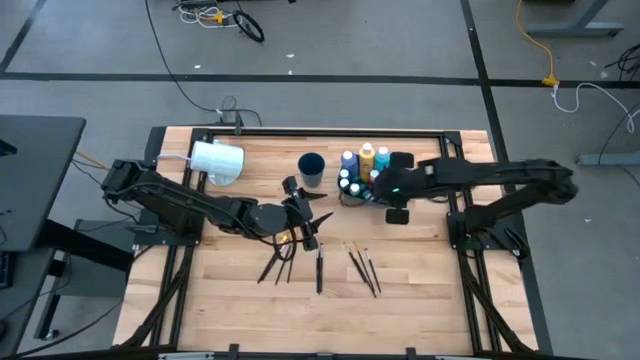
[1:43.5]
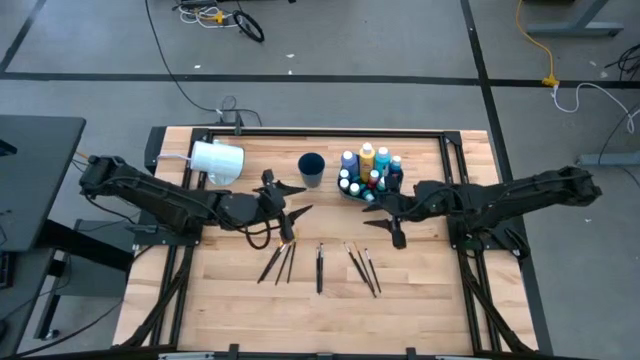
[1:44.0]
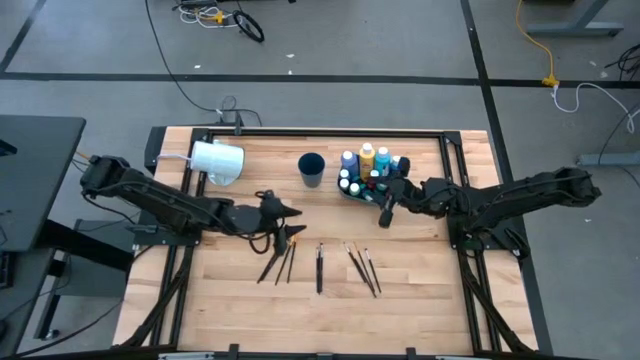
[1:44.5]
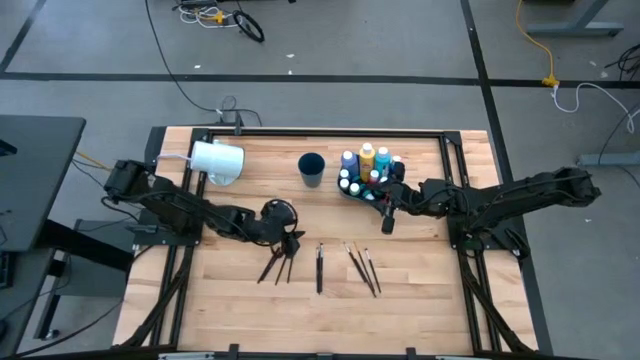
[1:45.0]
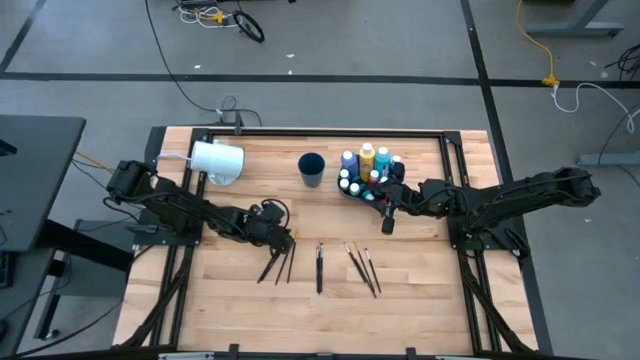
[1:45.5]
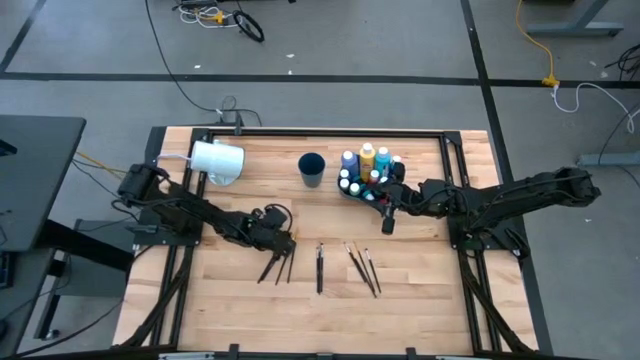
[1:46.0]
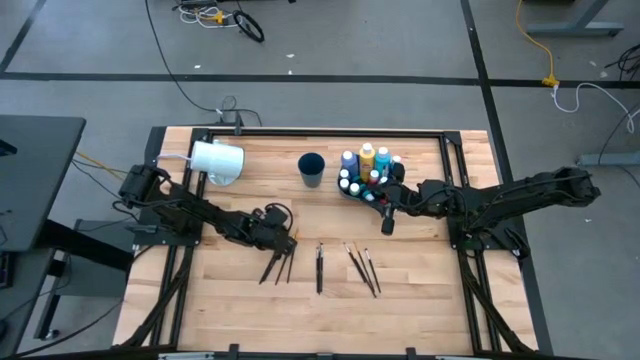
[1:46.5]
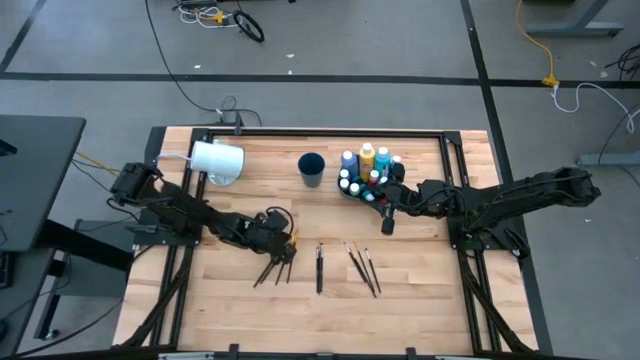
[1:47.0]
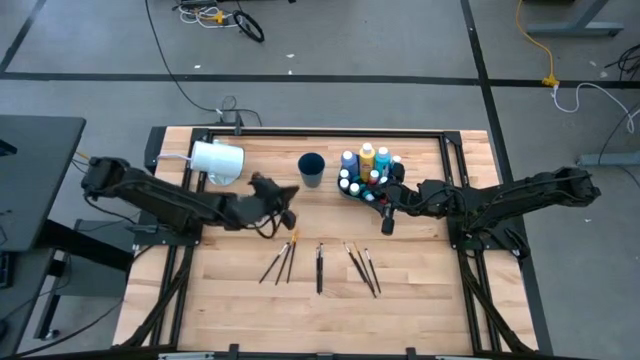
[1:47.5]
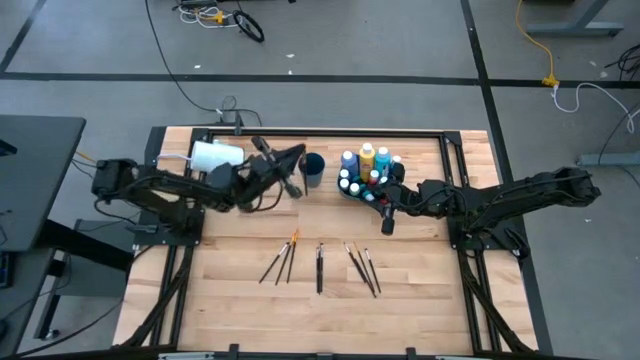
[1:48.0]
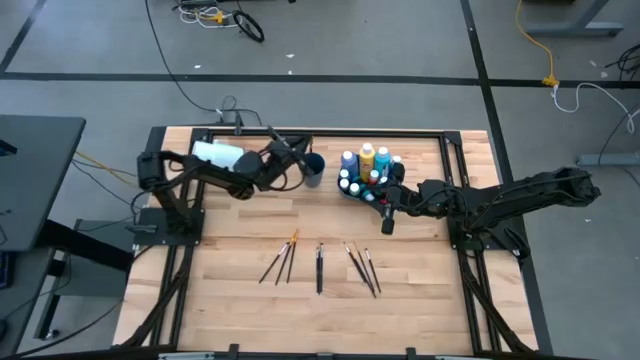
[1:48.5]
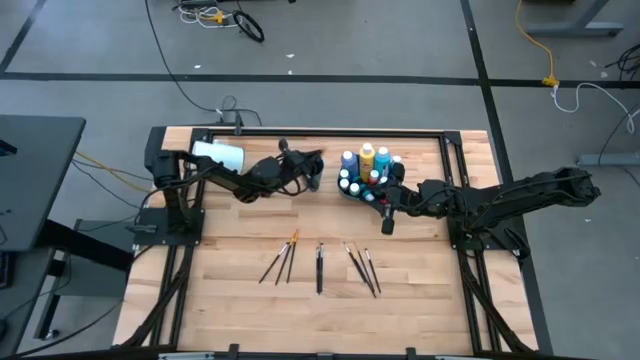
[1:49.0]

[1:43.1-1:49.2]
Task: Pick & Place Paint Supplies
Put the gold paint brush into the blue cup

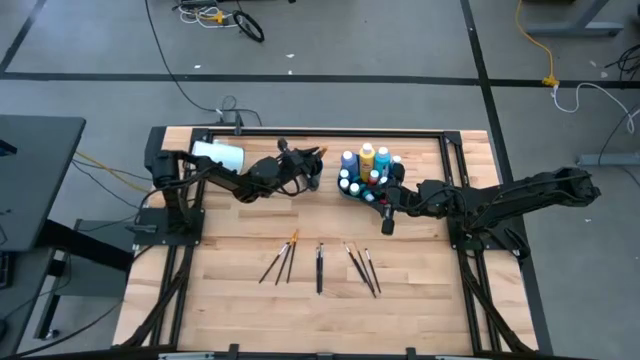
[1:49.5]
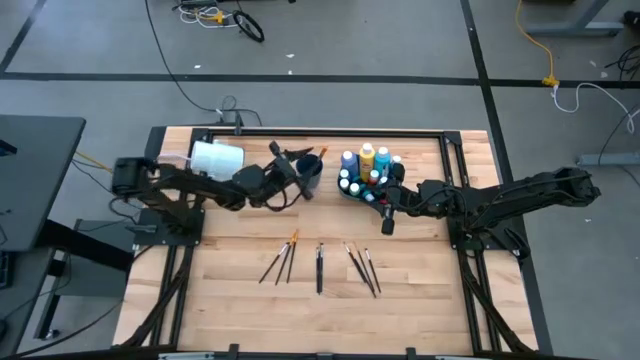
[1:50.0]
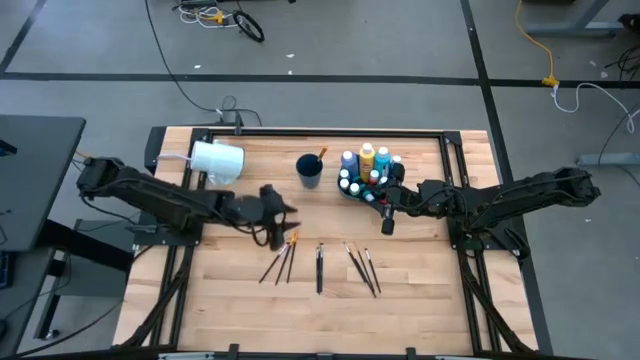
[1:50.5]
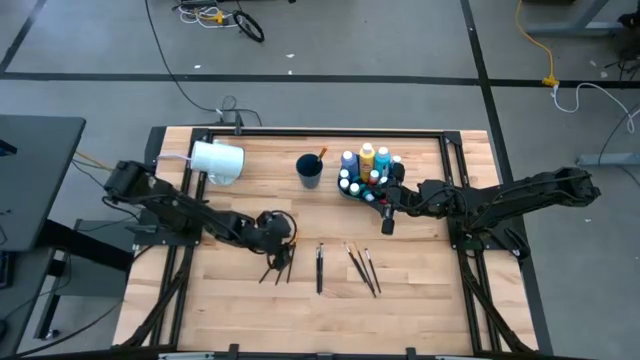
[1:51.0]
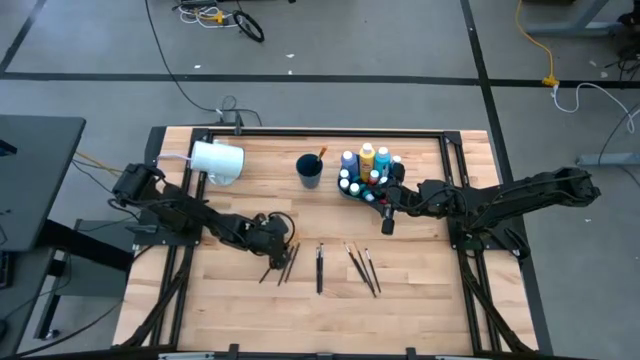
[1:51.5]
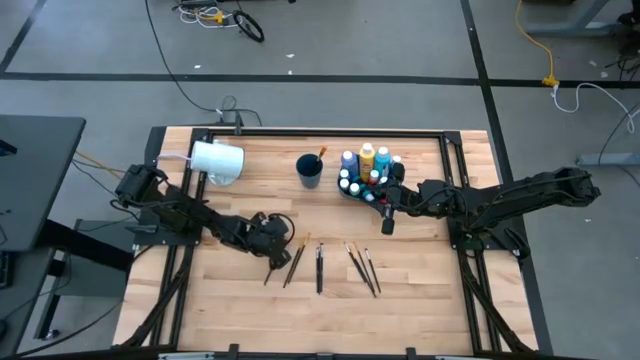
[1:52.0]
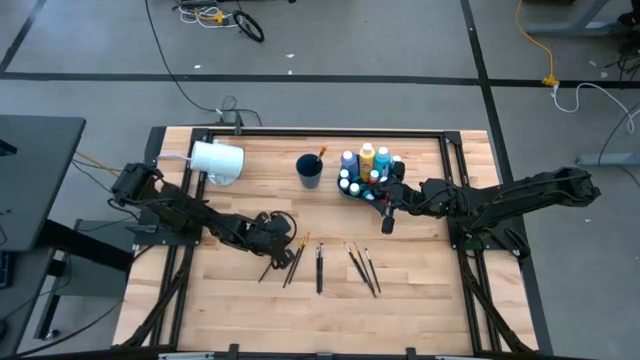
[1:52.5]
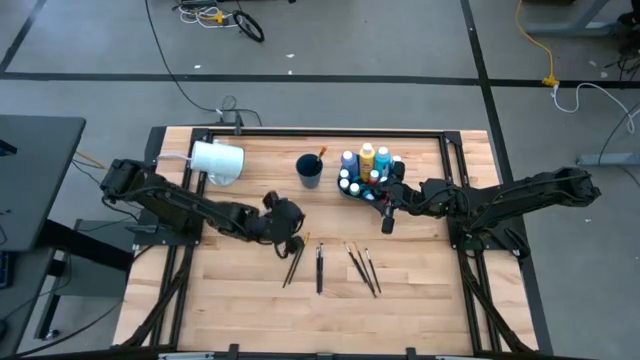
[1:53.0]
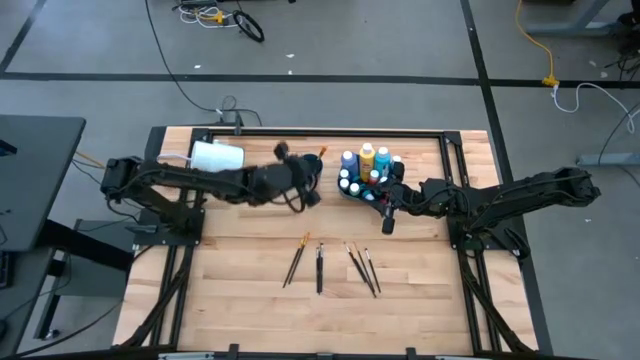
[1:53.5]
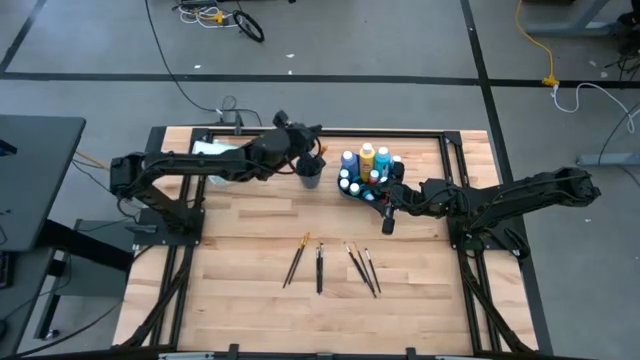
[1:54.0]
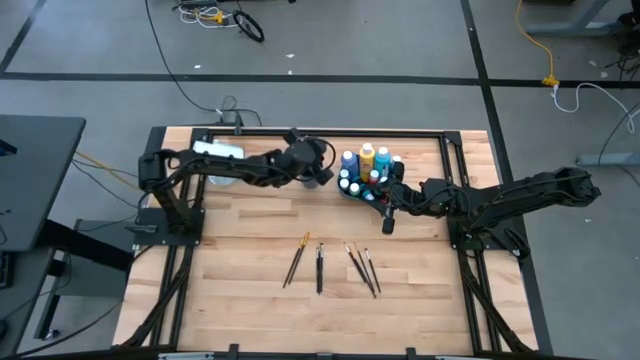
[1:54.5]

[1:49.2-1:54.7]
Put the silver paint brush into the blue cup

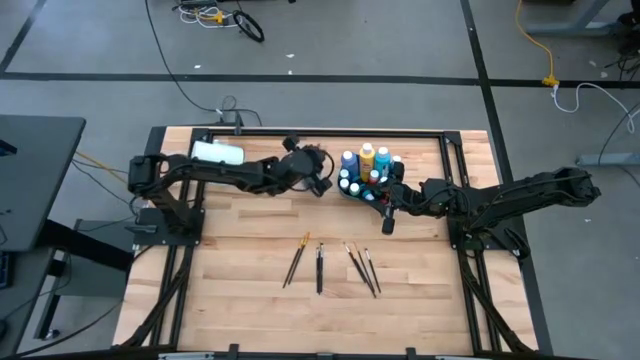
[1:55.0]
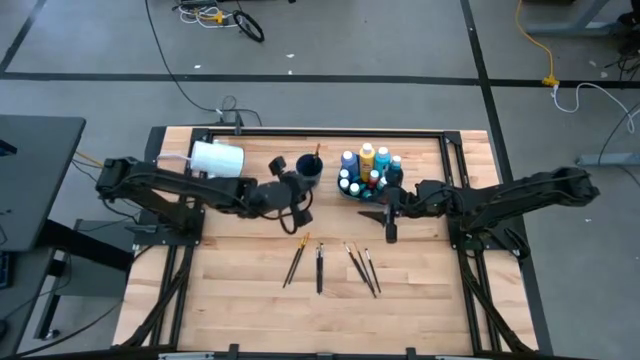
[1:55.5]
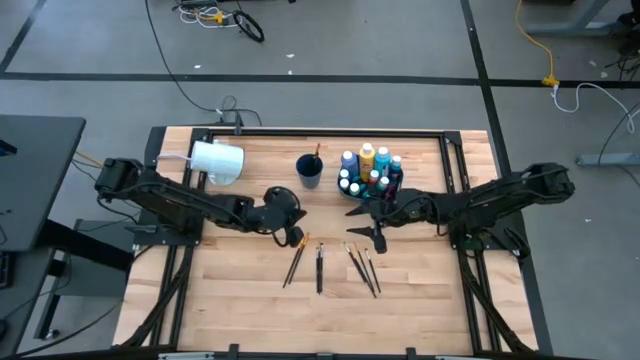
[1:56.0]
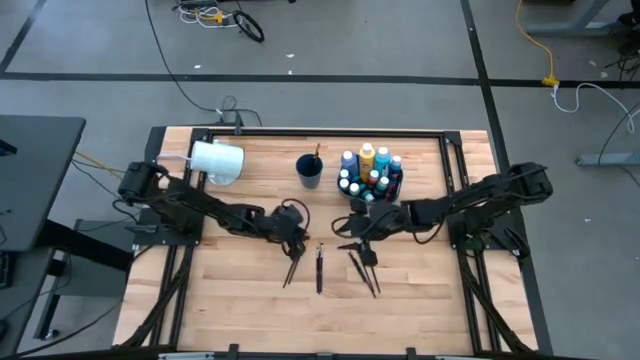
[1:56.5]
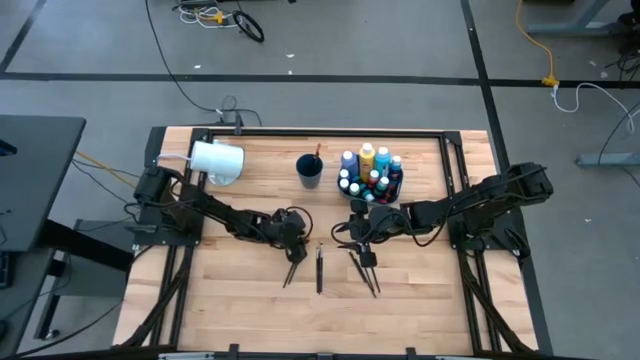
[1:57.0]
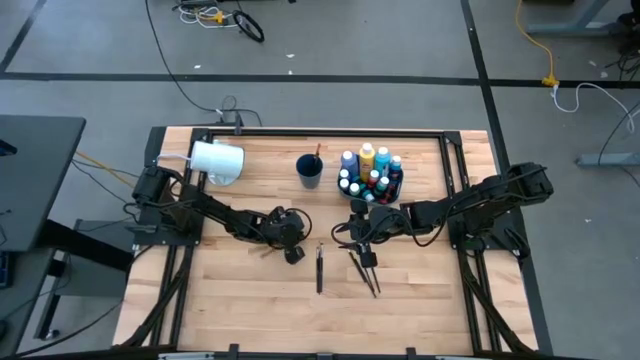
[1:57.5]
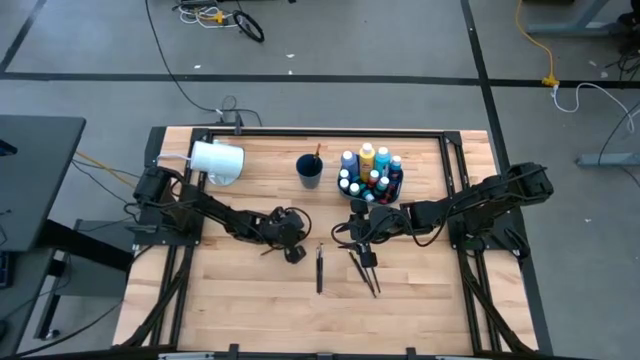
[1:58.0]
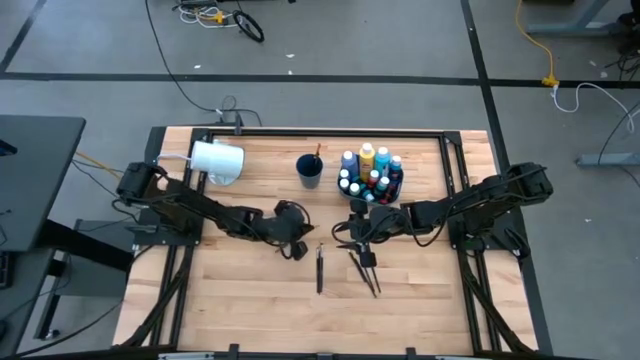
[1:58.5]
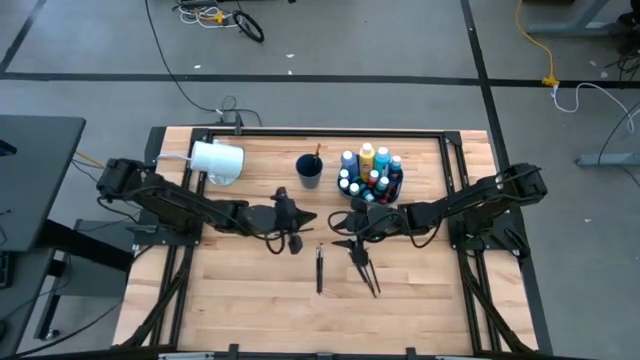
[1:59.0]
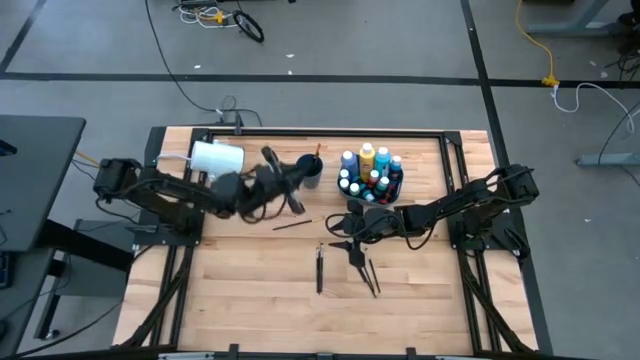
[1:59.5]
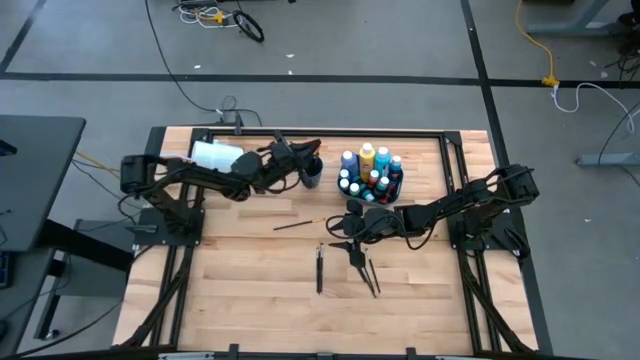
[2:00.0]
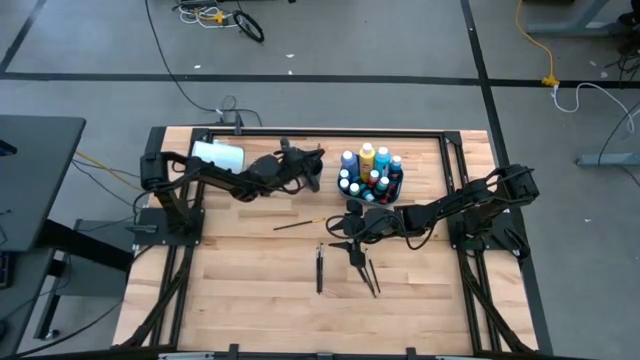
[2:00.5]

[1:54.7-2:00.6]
Put the gold paint brush into the blue cup

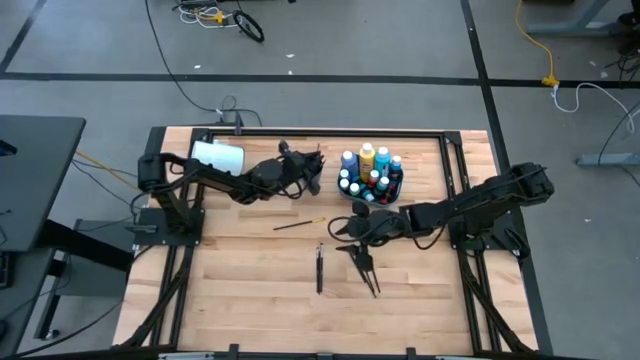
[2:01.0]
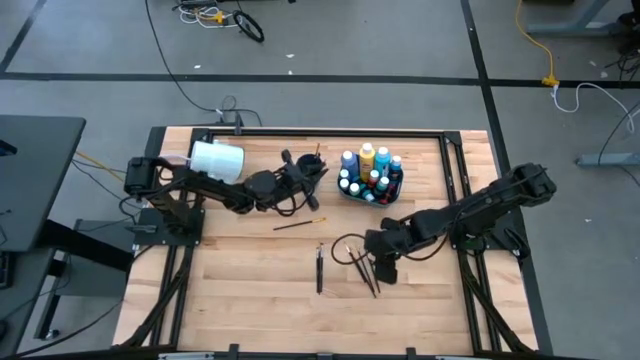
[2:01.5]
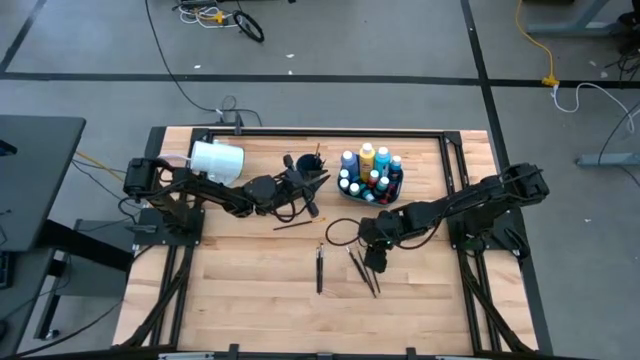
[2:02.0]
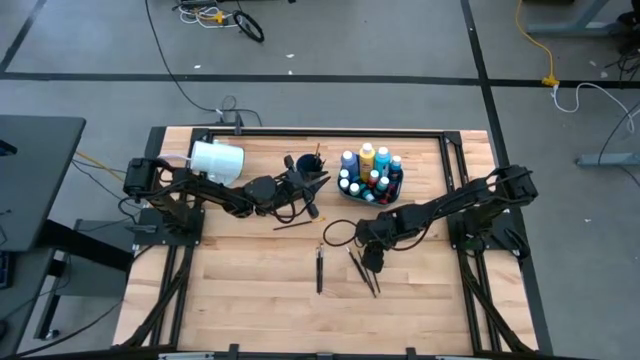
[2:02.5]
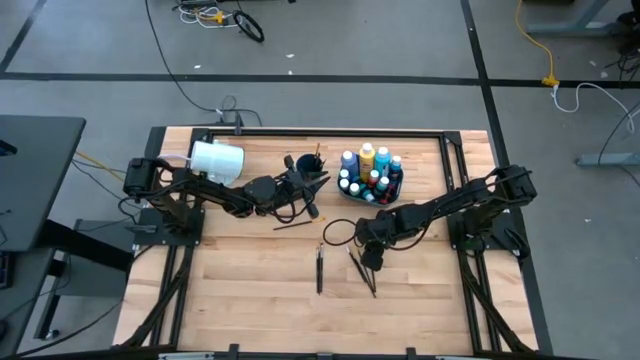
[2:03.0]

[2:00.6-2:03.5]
Put the silver paint brush into the blue cup

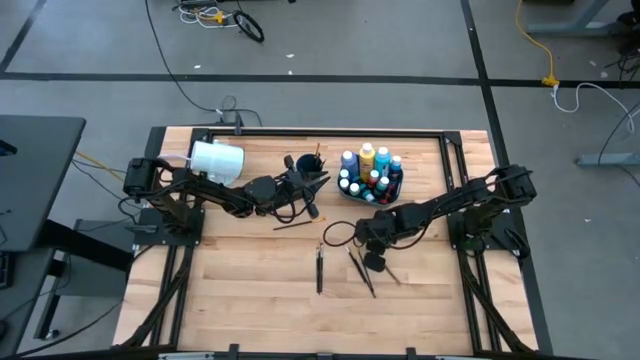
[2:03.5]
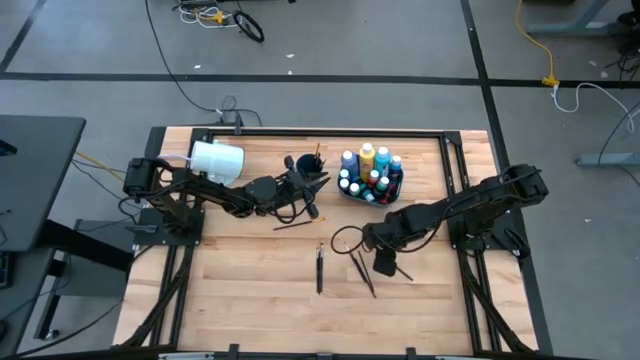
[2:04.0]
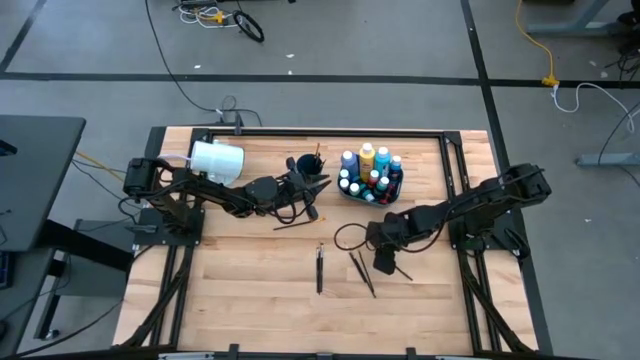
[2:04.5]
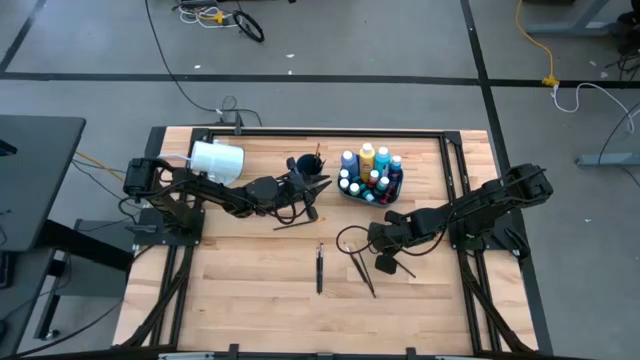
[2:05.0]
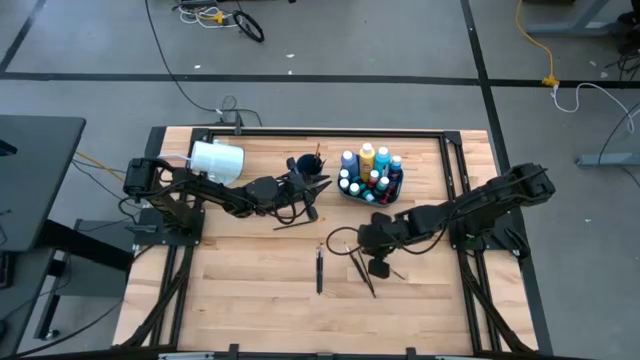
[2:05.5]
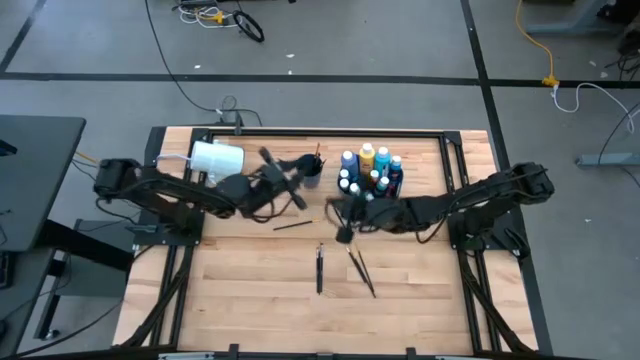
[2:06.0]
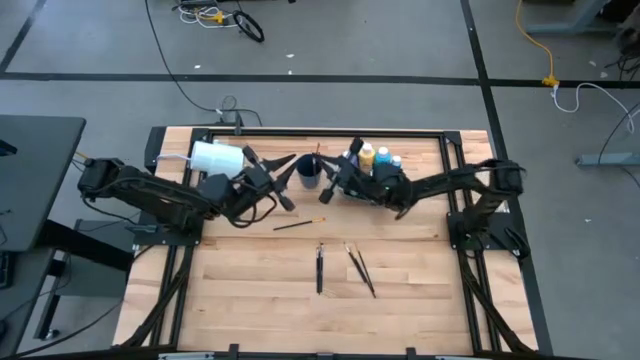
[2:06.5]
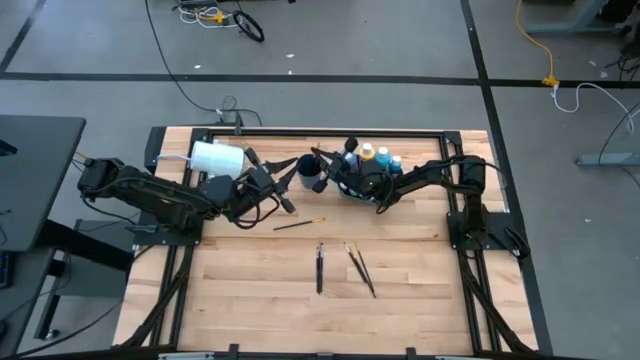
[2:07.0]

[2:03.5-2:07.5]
Put the silver paint brush into the blue cup
